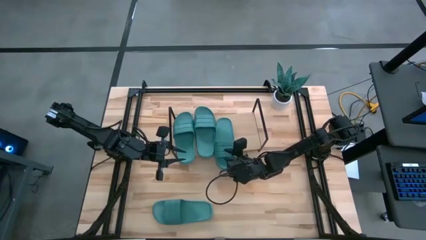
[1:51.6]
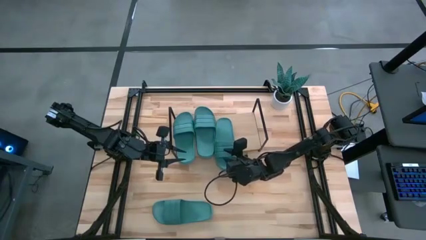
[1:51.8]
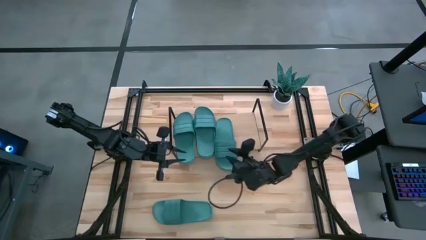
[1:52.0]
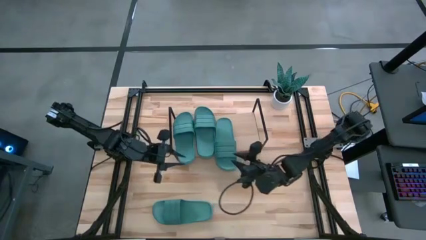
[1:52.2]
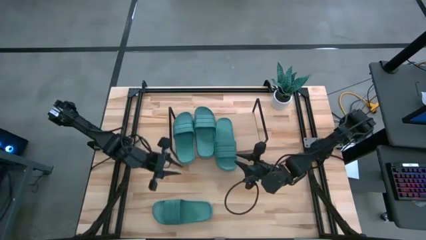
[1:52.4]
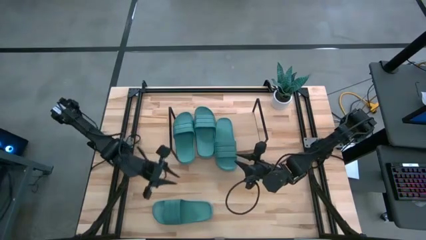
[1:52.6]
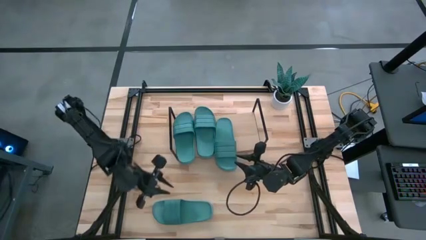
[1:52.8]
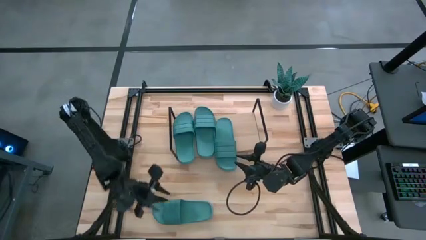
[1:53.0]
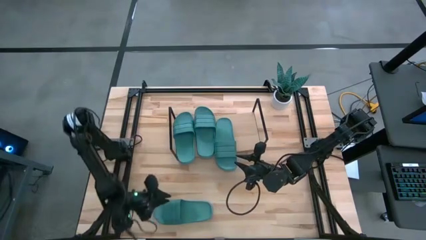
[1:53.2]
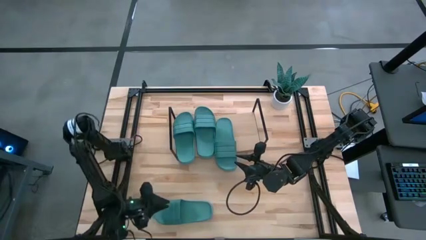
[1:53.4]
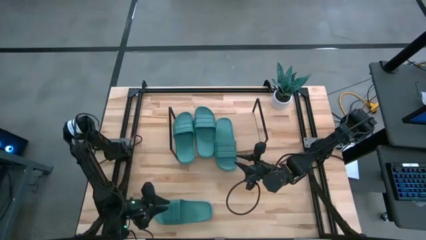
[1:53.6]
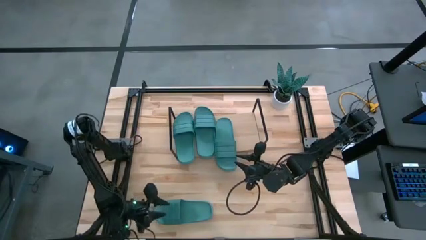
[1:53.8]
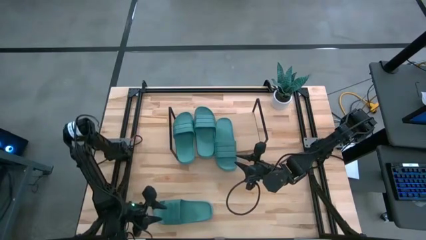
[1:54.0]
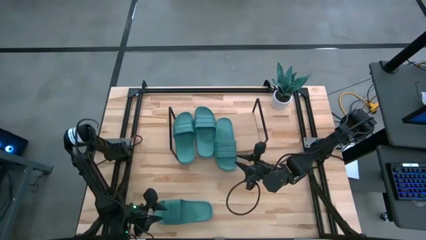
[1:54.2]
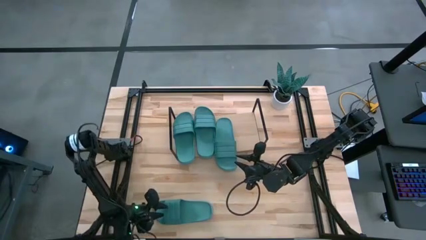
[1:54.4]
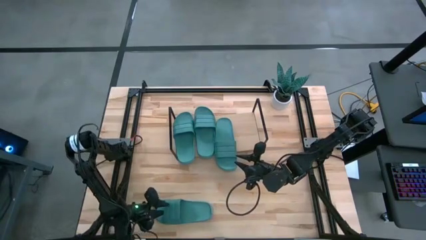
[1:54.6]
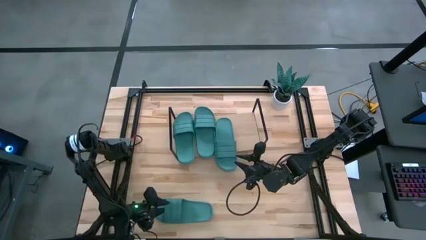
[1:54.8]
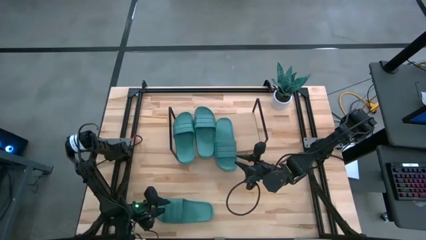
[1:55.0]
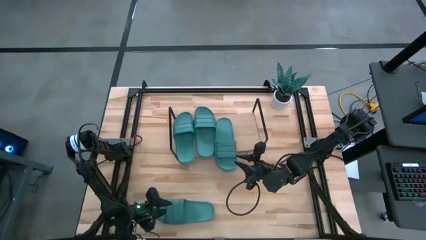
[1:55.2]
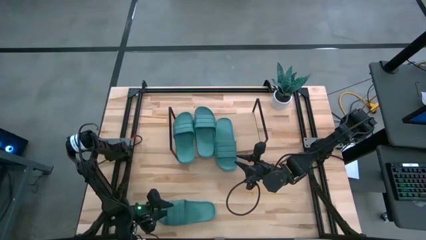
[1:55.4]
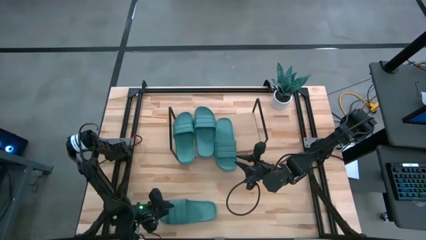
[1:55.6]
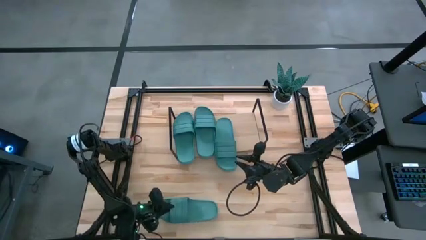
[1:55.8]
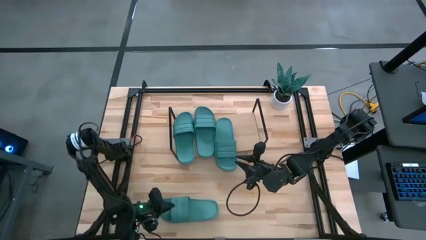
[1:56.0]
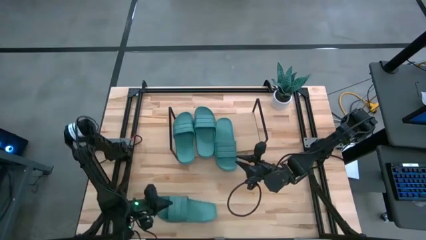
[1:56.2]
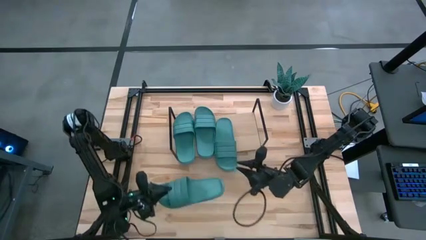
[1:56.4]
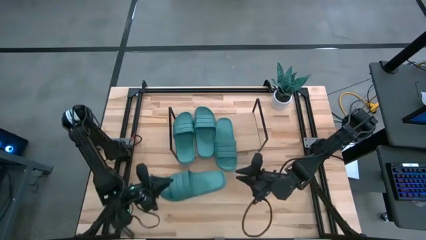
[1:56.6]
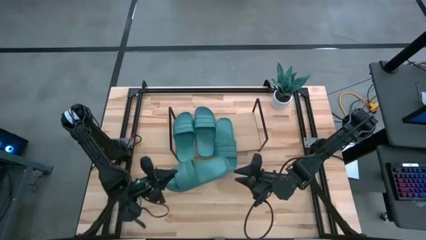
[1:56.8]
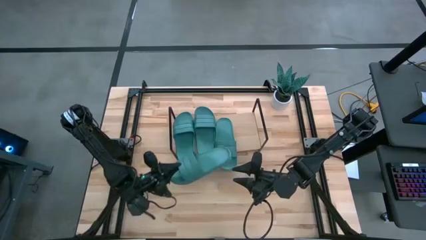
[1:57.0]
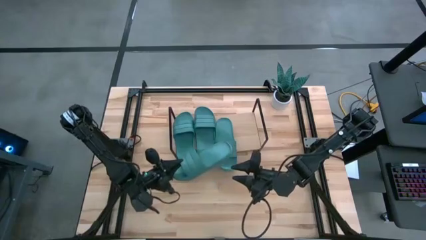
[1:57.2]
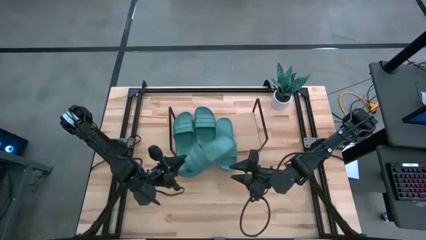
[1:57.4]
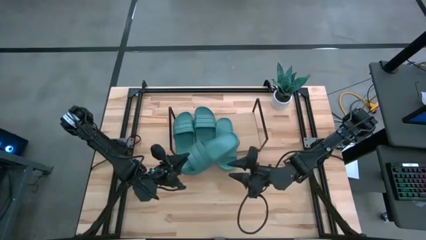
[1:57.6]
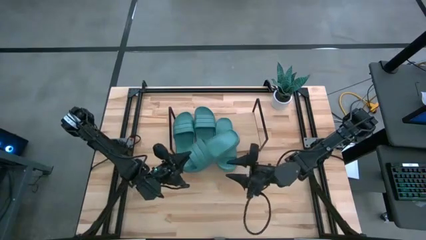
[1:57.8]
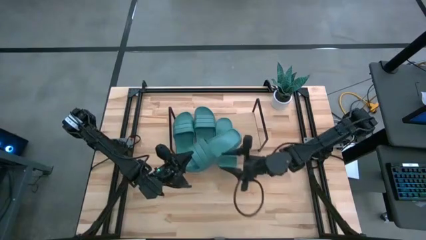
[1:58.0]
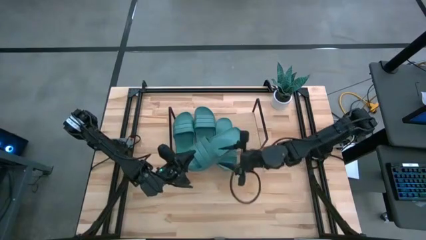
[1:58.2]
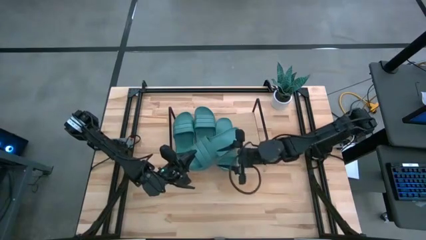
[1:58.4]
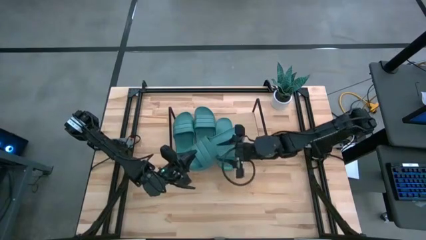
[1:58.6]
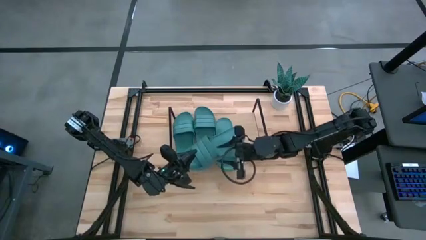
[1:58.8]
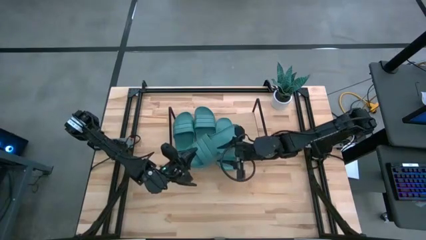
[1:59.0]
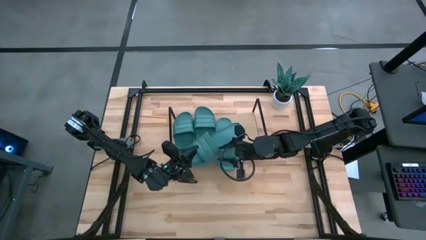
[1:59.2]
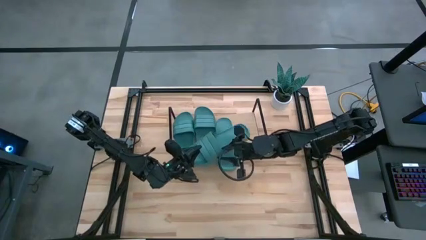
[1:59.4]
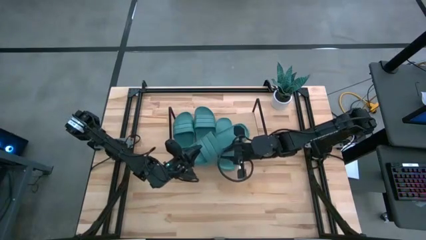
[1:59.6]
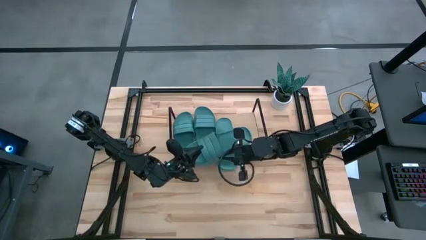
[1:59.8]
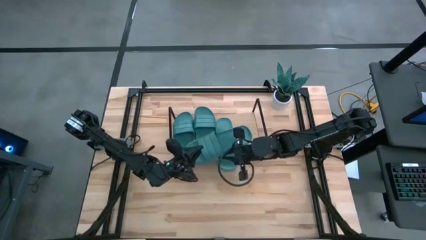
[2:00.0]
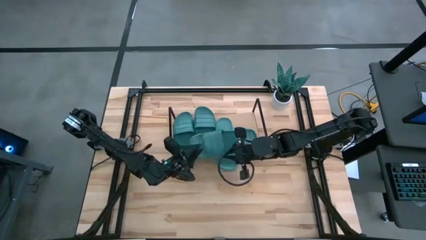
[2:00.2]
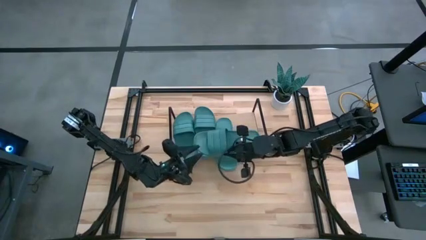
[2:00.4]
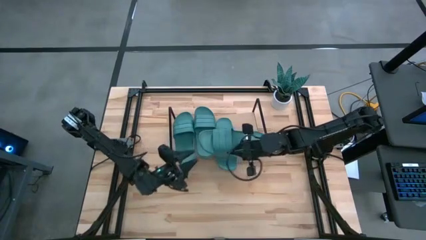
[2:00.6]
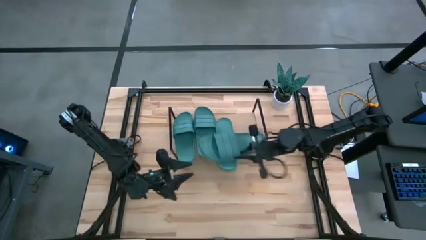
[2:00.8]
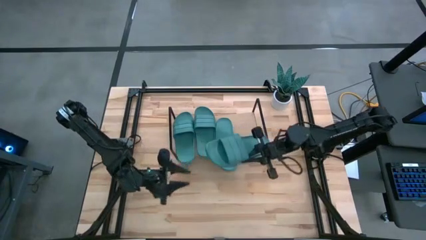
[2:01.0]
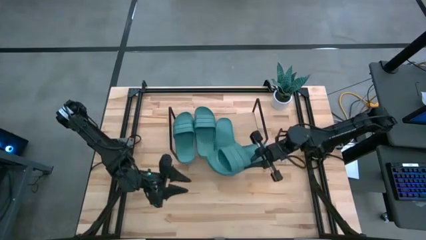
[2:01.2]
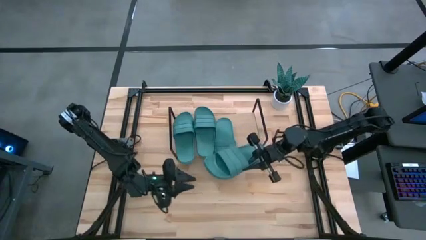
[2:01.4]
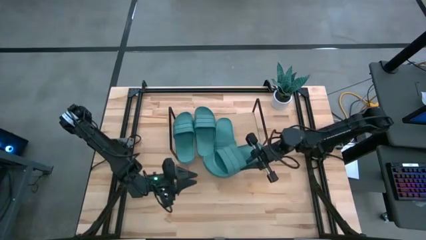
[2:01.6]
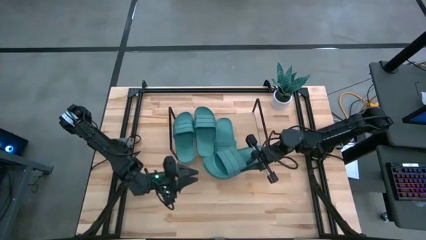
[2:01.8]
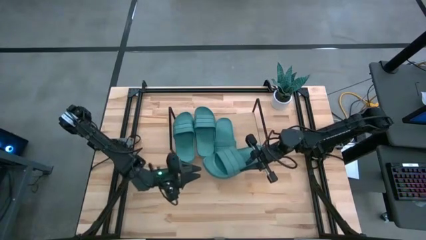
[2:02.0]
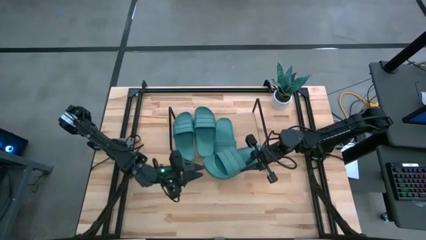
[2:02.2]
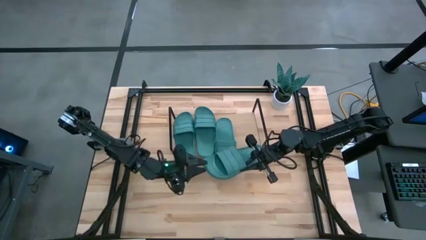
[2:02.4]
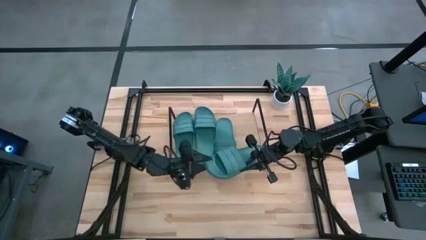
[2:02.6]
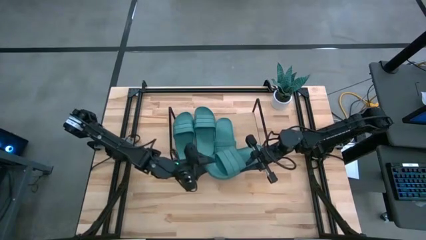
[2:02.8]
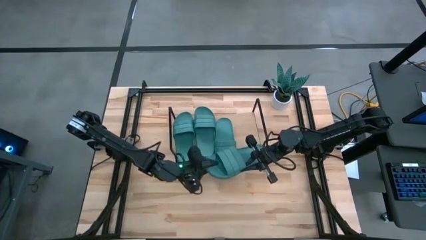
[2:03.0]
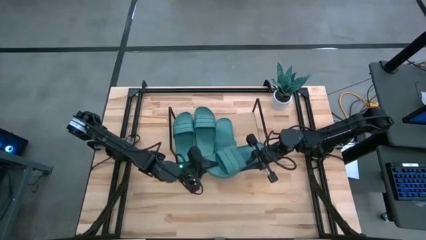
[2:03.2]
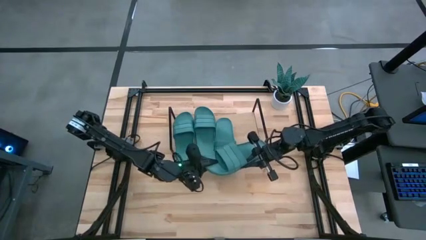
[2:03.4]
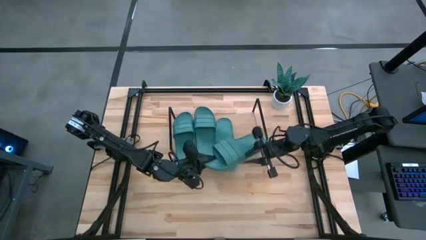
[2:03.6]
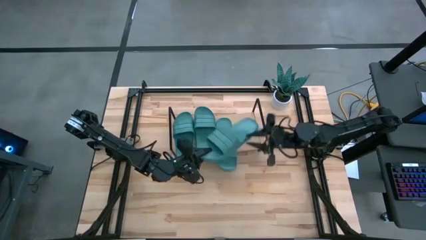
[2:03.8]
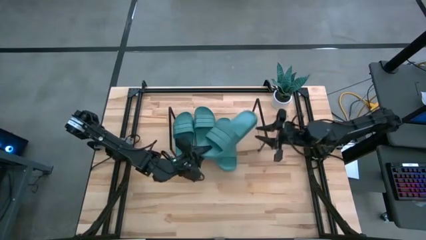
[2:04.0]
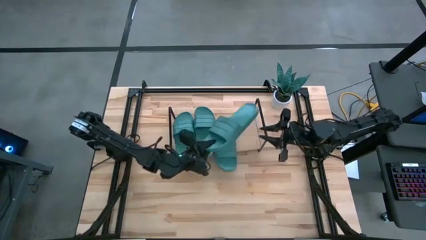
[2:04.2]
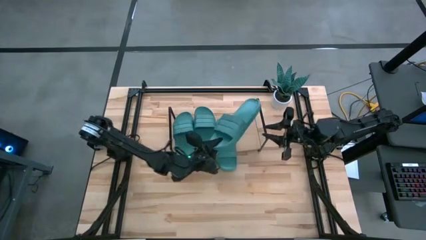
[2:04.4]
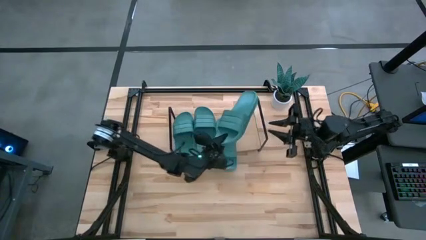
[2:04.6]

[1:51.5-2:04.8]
Task: Pick and place slides into the shelf
Put the green slipper on the shelf

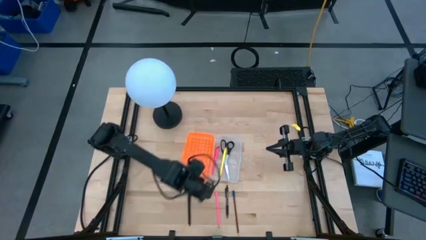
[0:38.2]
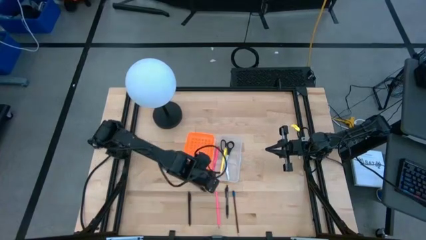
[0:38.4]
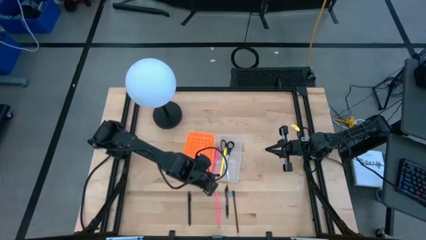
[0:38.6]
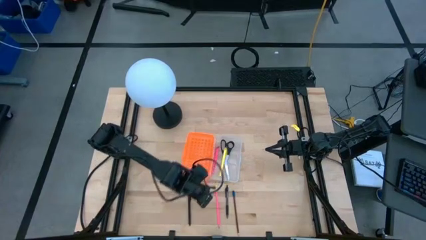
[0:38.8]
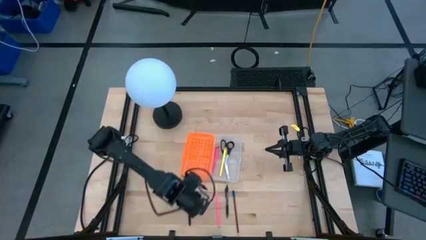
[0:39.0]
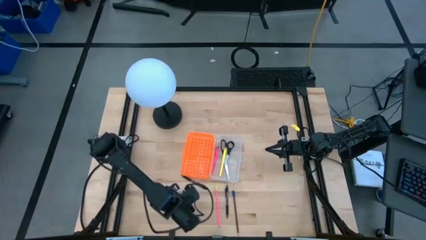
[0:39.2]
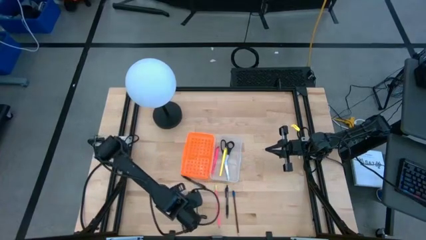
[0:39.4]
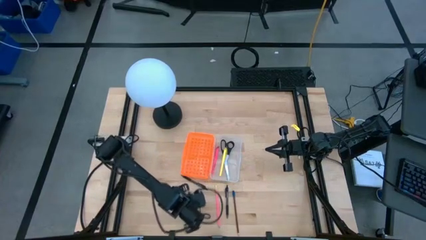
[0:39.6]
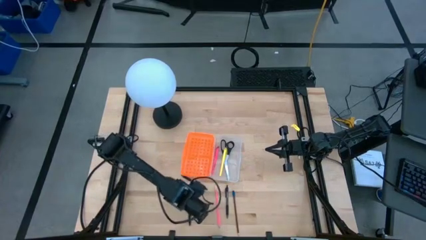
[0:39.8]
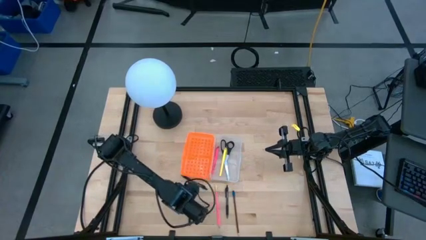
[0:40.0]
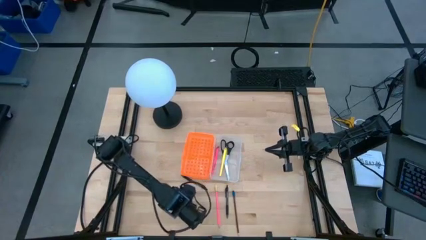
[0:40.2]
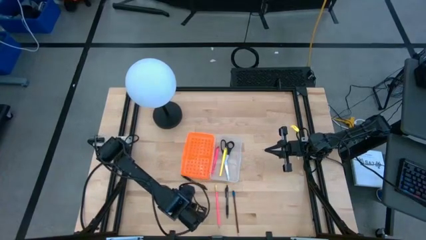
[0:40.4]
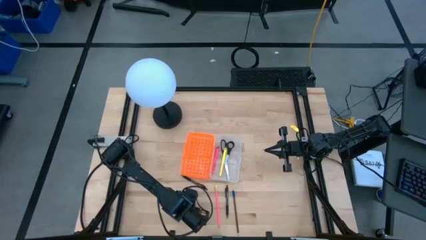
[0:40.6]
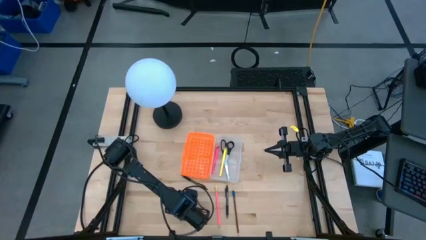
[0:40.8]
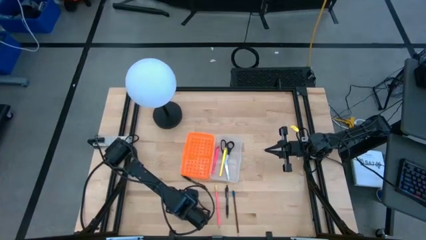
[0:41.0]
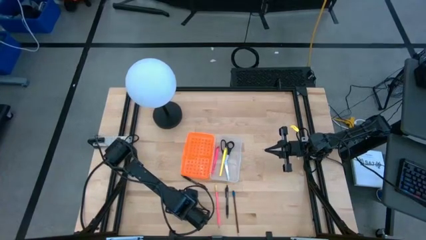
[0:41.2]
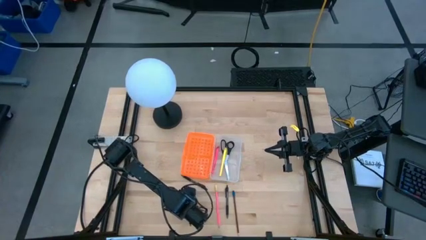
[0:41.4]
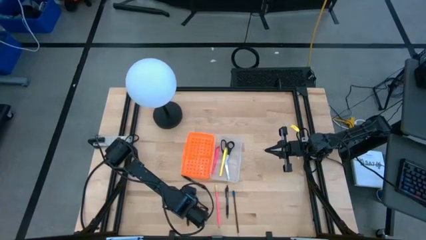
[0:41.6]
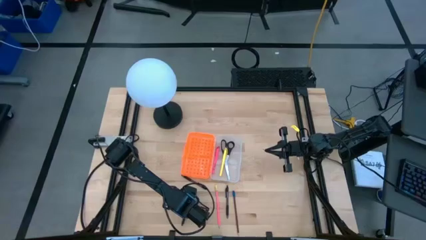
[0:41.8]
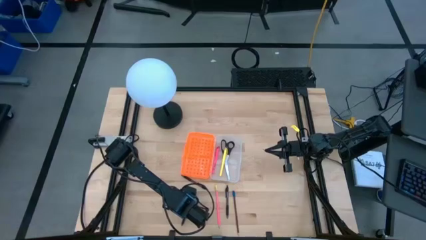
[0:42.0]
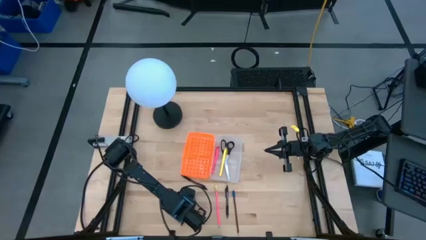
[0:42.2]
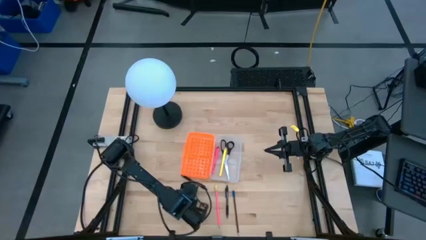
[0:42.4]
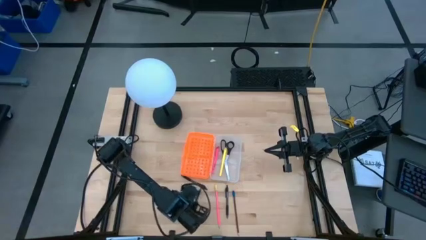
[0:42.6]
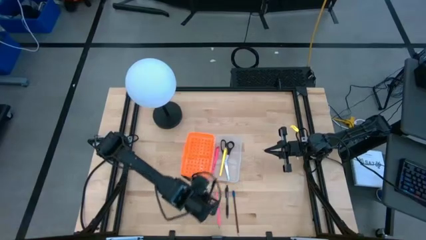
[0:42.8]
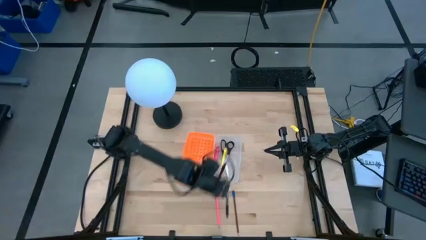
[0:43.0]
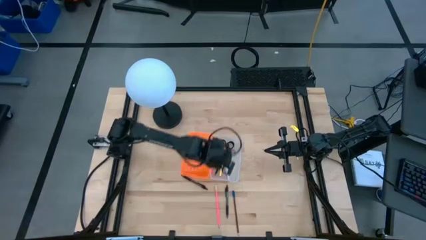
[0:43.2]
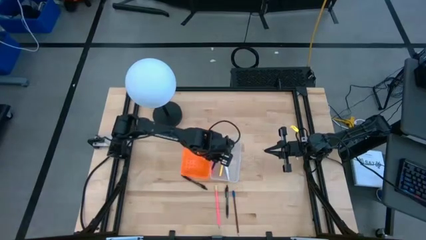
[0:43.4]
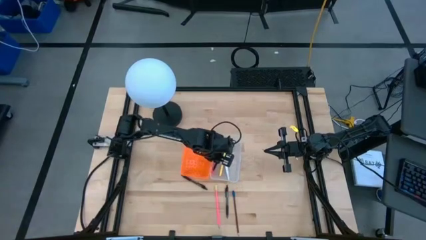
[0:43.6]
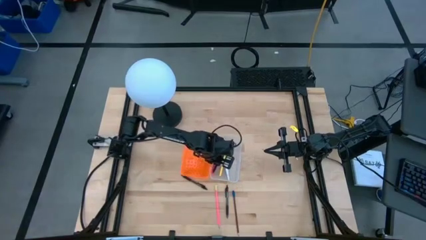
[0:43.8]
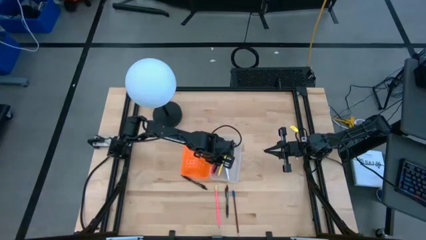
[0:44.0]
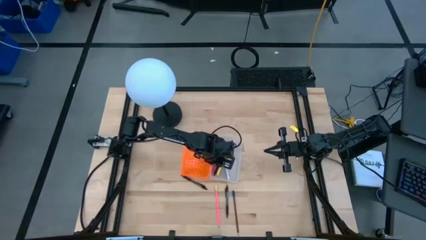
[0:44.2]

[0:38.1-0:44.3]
Task: Pick & place school supplies into a supply box
Put the black pen into the orange supply box
